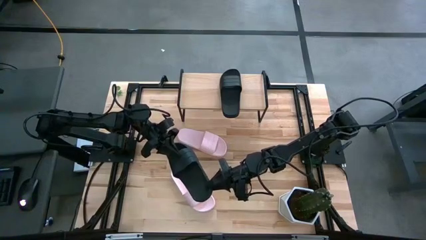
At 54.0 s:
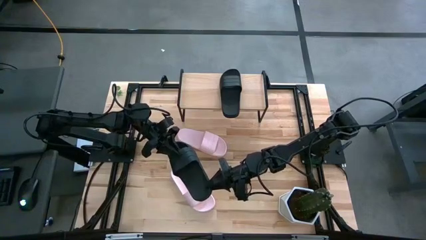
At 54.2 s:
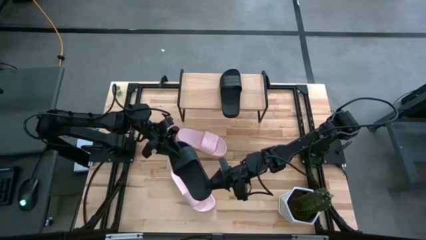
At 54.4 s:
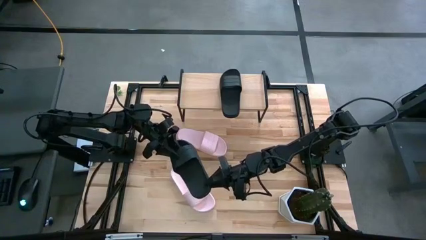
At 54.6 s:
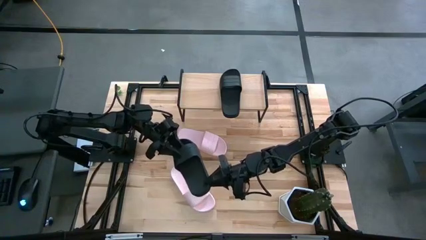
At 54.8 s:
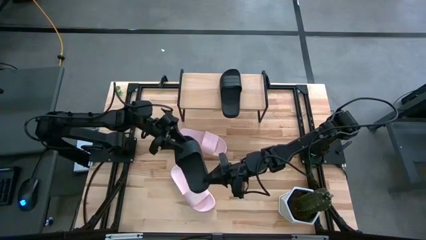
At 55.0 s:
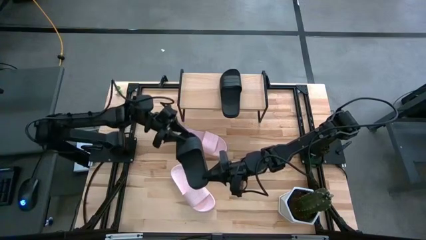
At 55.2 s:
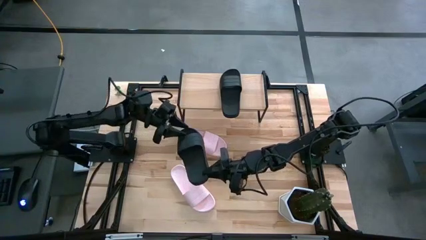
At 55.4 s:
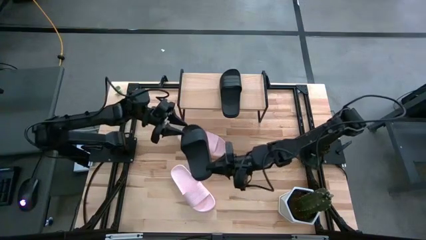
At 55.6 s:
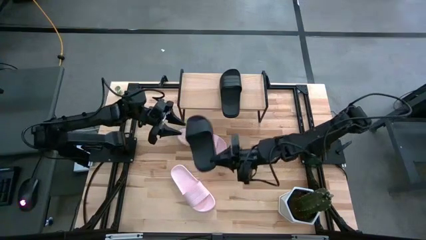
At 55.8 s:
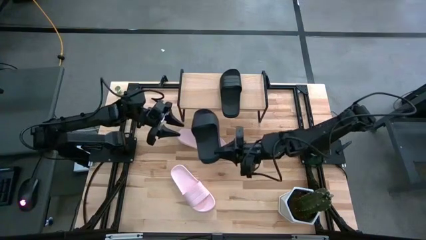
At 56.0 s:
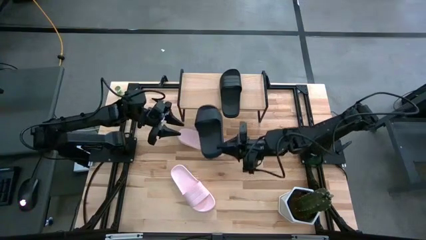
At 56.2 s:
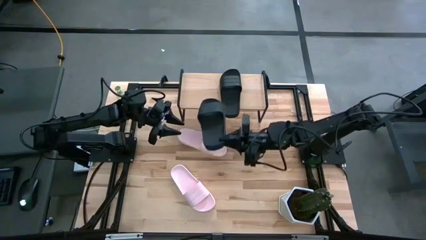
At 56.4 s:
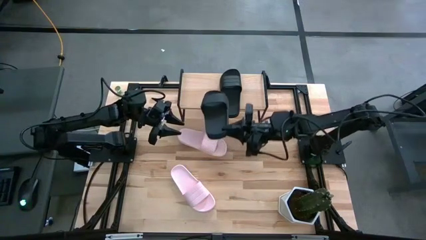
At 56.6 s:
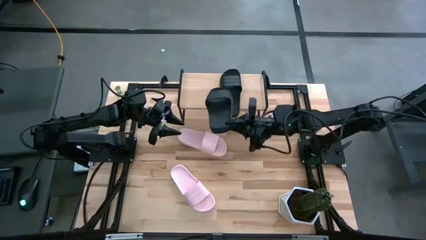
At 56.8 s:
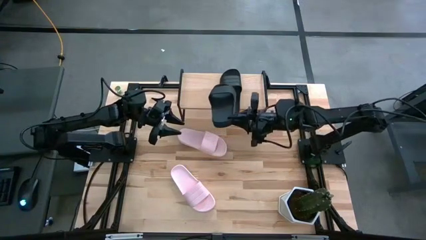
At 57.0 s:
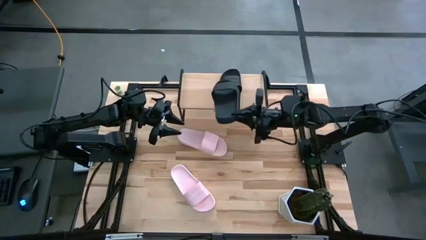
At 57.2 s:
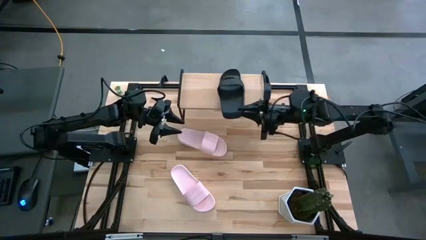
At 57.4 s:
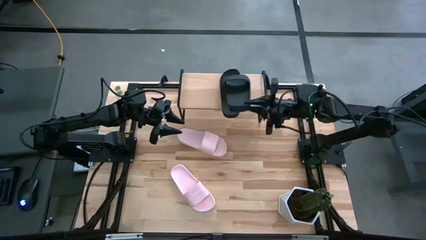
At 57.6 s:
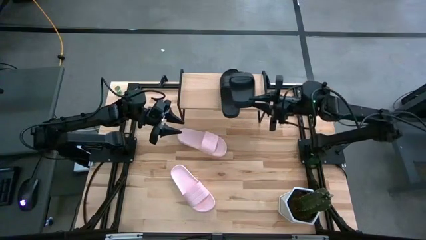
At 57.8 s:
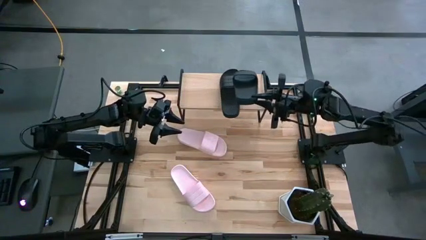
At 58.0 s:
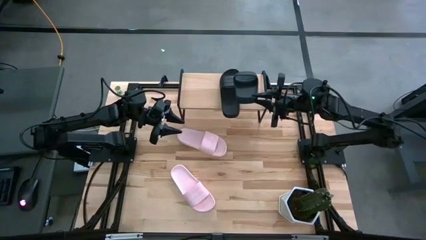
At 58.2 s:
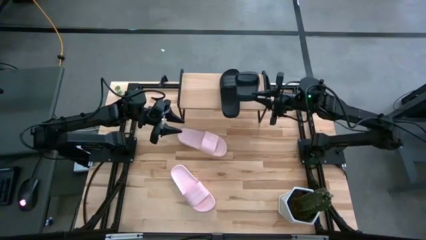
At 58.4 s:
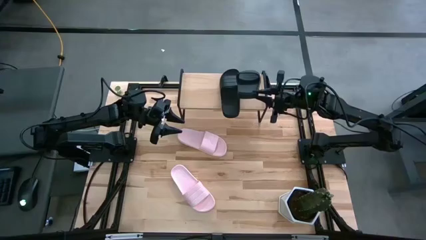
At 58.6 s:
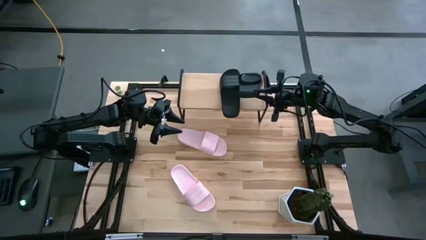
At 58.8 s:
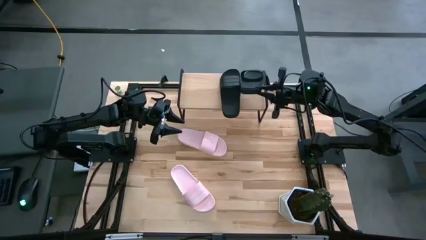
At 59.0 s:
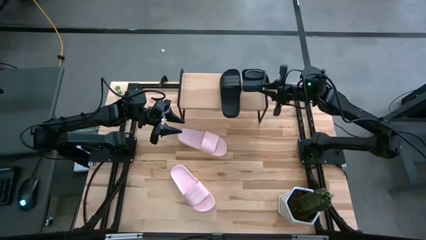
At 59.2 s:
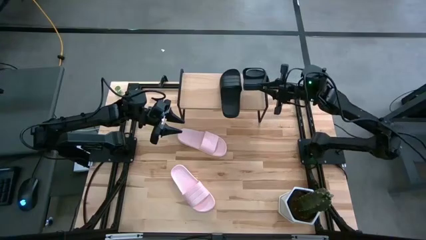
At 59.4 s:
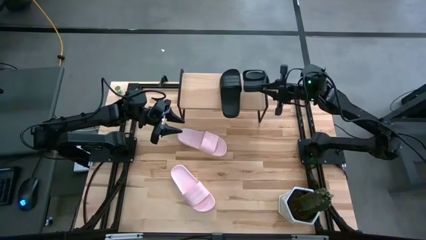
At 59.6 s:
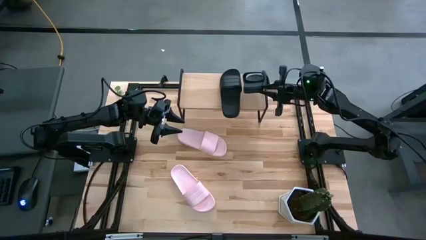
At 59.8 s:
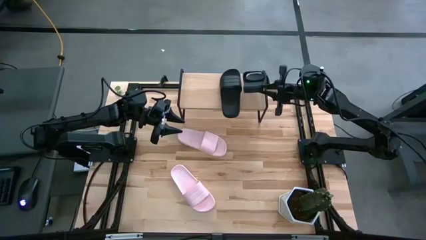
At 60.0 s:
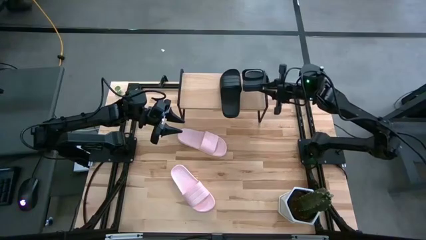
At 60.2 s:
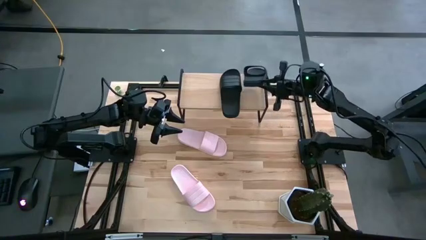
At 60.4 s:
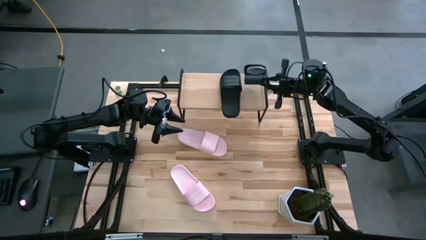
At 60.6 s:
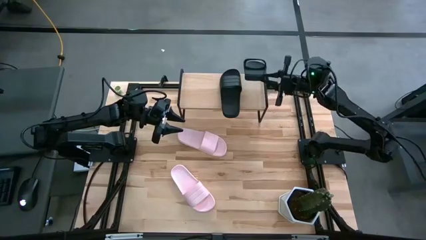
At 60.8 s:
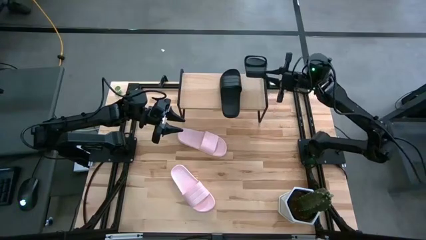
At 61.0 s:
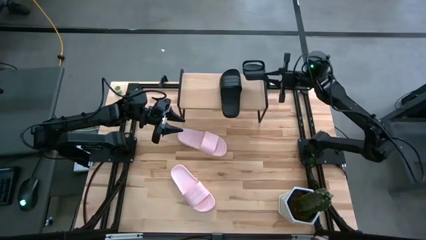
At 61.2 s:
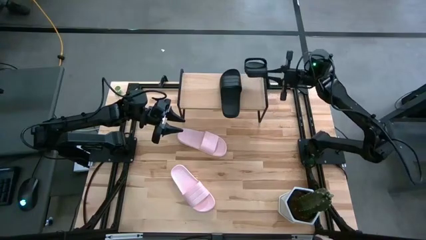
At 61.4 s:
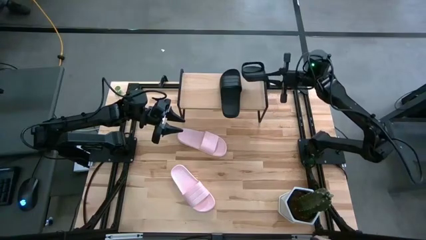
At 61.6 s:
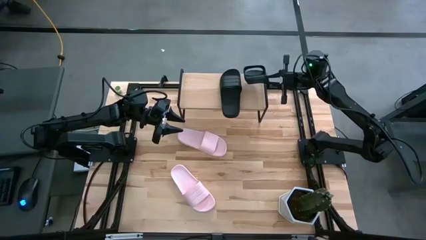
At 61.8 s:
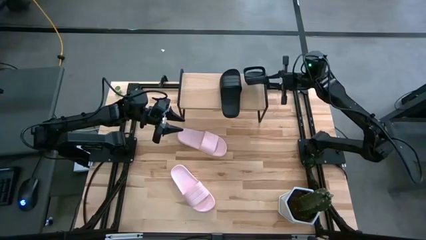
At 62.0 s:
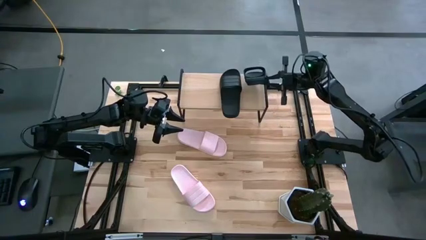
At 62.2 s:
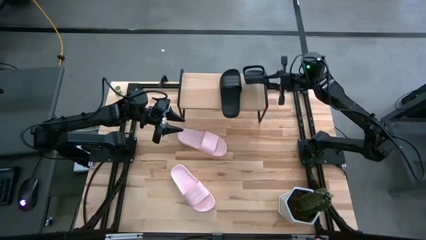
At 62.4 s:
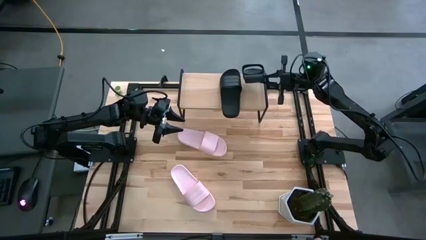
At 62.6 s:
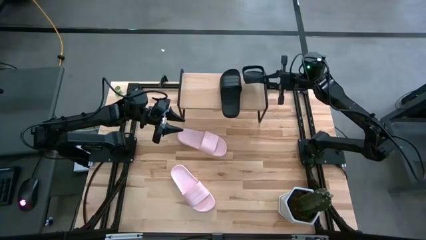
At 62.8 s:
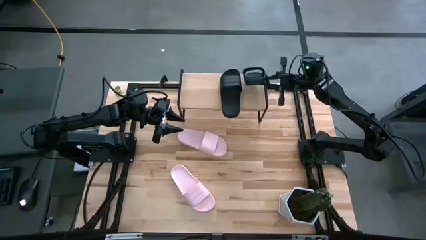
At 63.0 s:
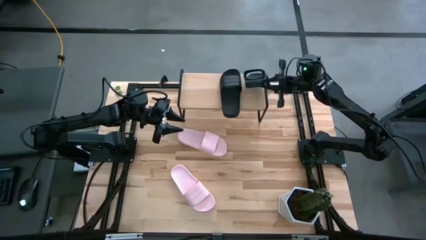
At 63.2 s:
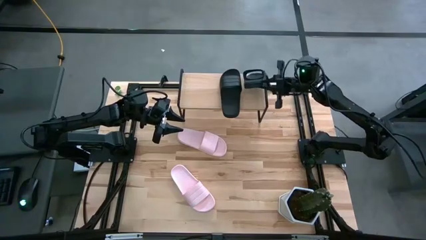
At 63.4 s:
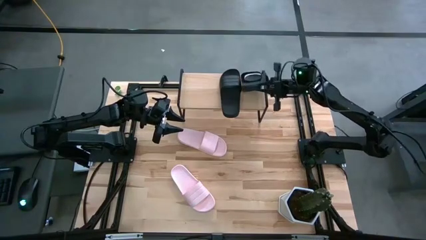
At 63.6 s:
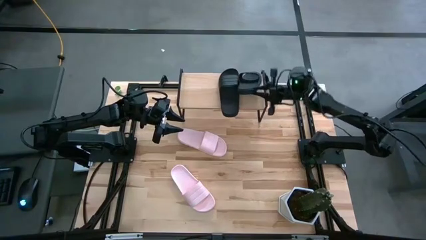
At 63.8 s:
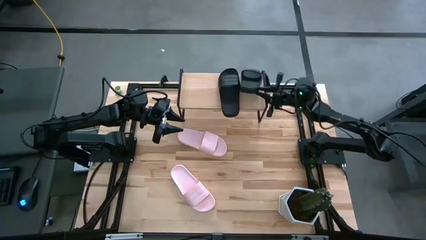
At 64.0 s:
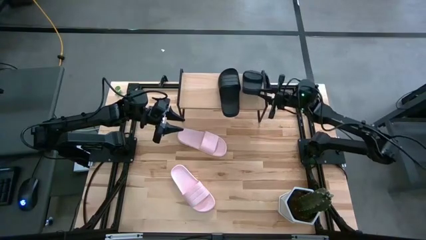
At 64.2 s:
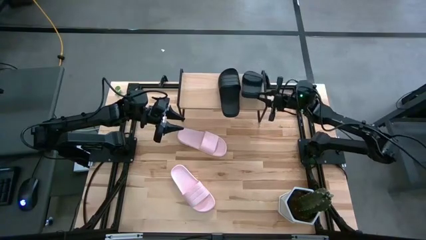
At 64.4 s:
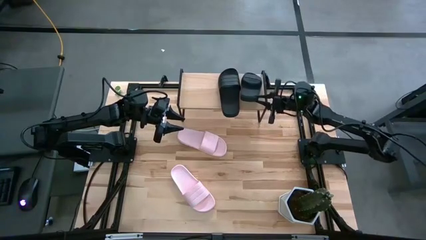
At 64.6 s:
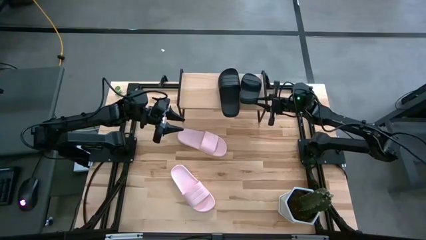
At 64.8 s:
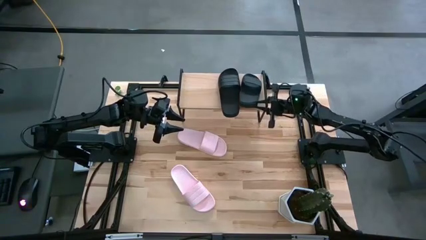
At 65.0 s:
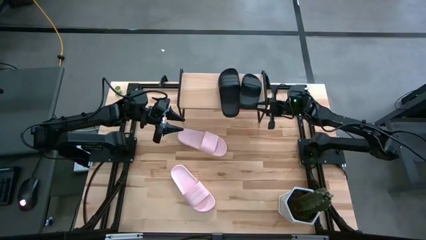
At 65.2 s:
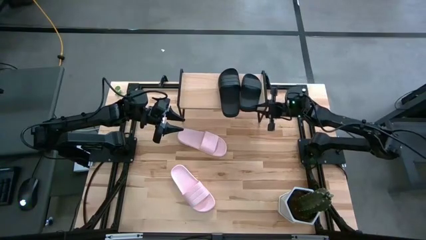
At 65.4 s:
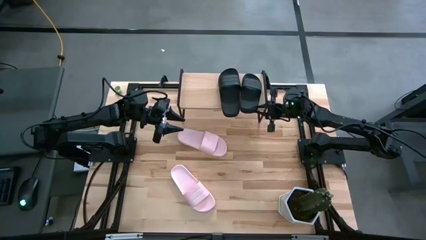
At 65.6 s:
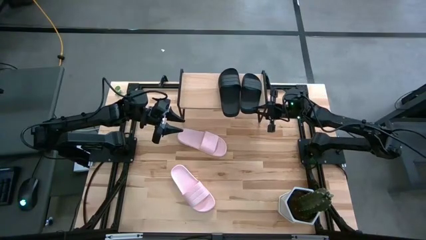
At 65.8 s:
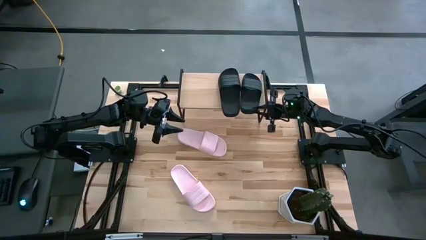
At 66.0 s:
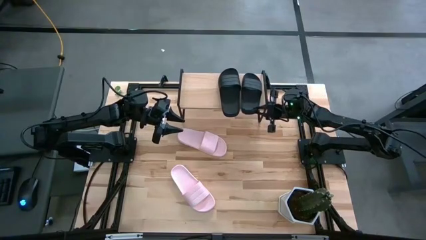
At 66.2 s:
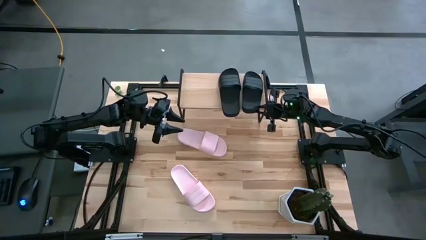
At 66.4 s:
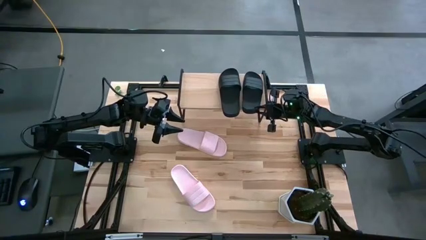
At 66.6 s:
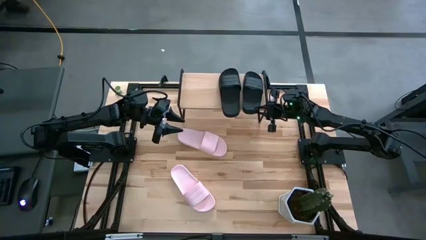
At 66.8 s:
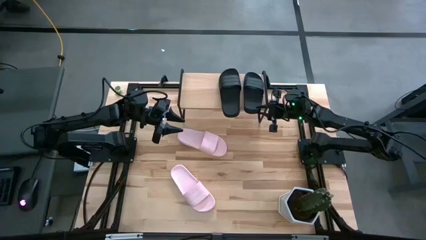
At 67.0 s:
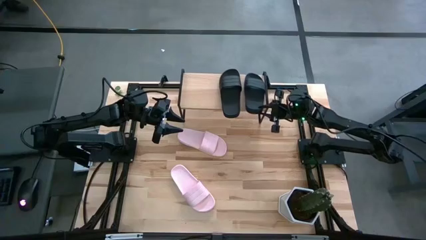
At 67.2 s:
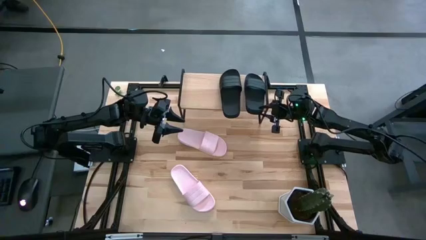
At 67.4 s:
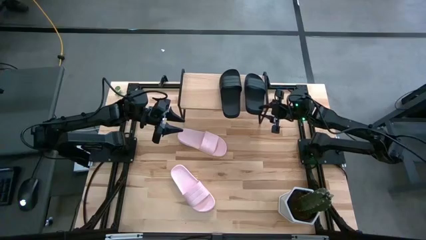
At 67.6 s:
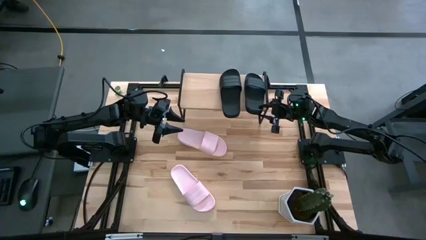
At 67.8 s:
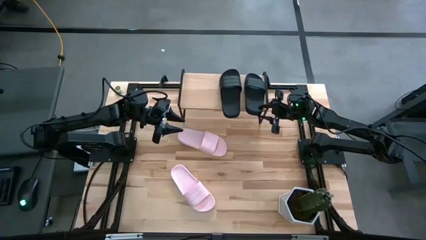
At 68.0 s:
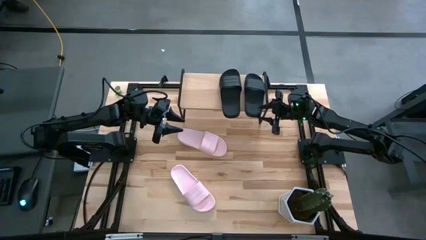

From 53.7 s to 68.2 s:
Task: Pick and place slides into the shelf
Put the black slipper on the shelf
